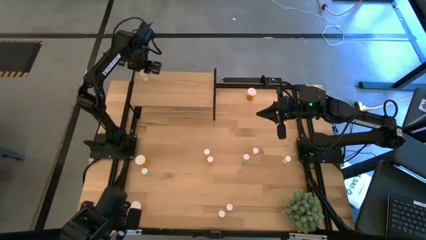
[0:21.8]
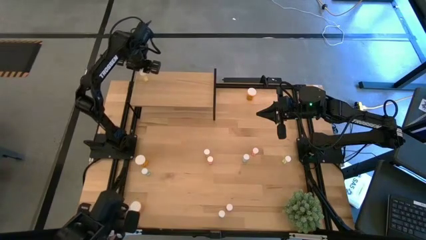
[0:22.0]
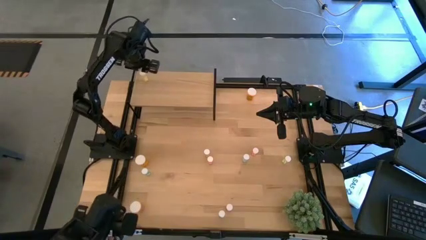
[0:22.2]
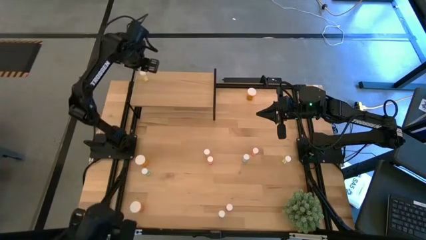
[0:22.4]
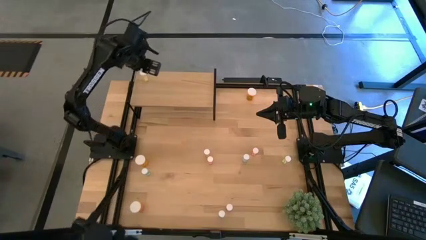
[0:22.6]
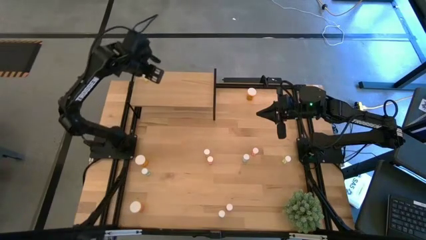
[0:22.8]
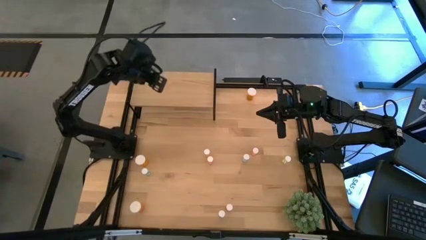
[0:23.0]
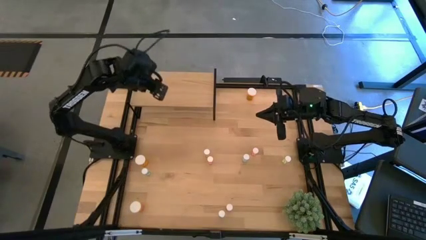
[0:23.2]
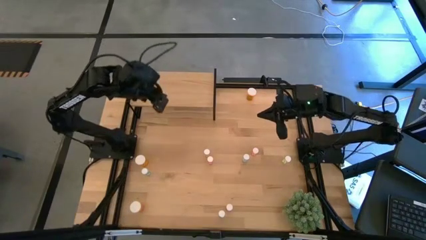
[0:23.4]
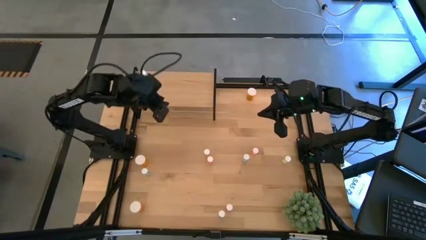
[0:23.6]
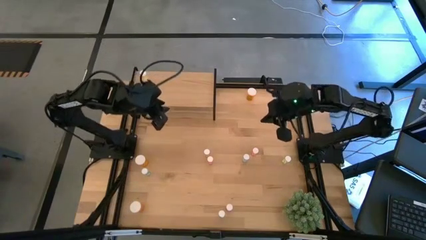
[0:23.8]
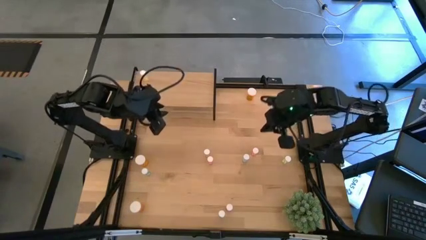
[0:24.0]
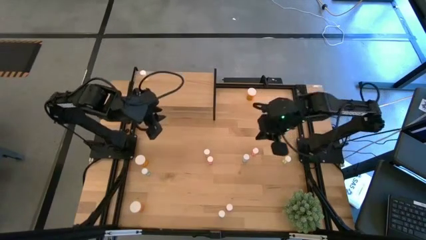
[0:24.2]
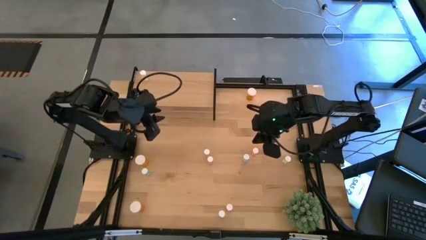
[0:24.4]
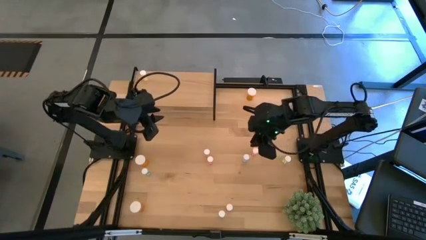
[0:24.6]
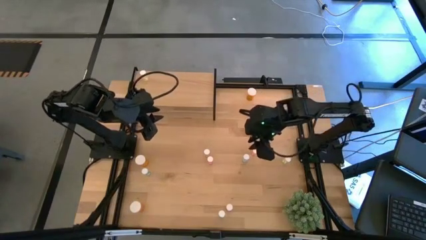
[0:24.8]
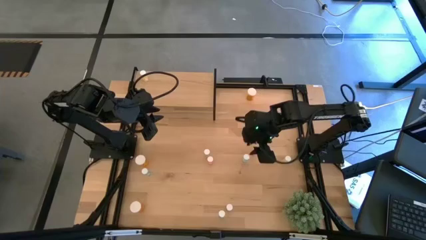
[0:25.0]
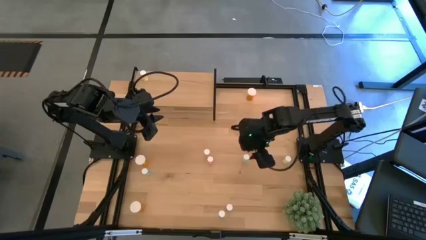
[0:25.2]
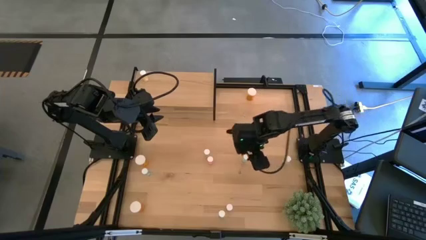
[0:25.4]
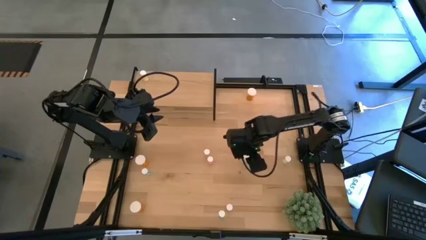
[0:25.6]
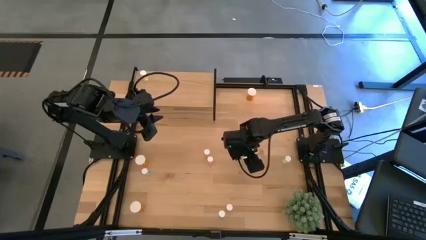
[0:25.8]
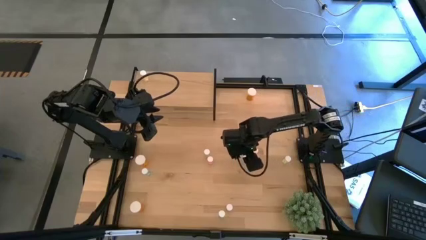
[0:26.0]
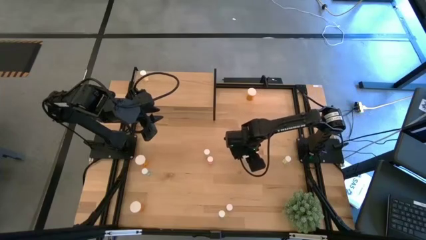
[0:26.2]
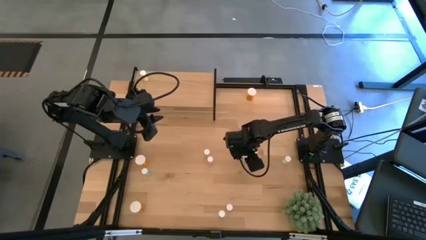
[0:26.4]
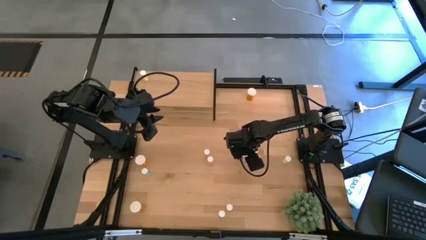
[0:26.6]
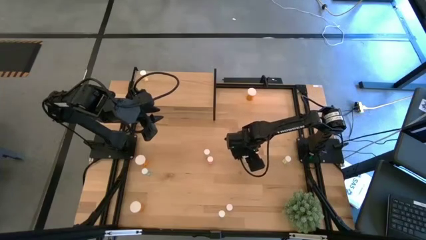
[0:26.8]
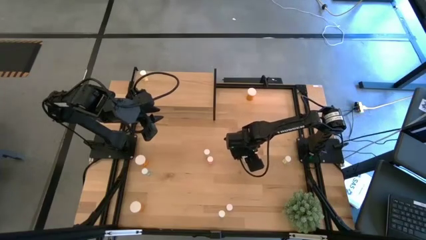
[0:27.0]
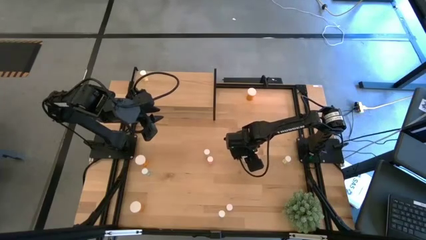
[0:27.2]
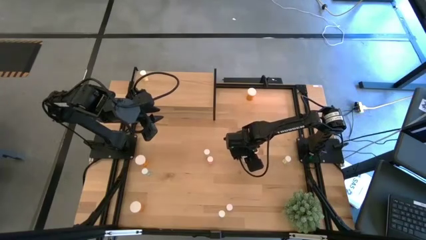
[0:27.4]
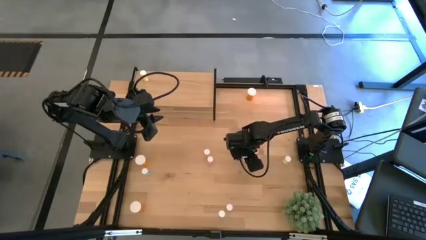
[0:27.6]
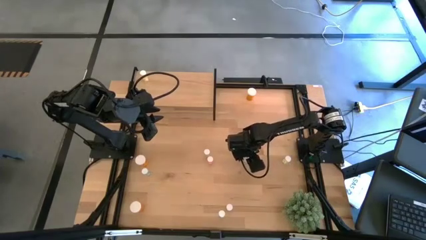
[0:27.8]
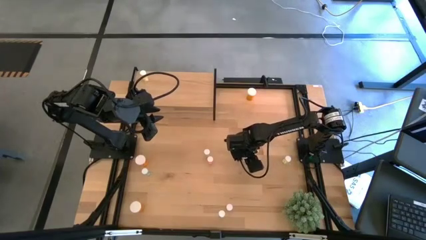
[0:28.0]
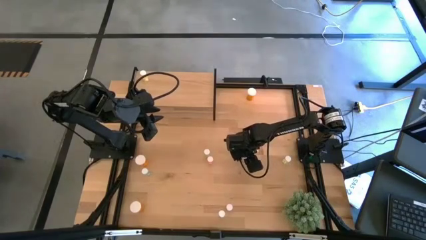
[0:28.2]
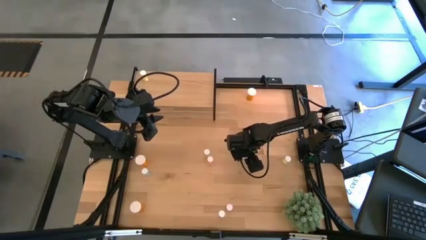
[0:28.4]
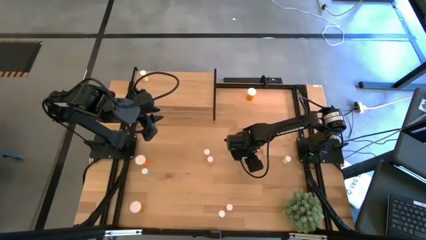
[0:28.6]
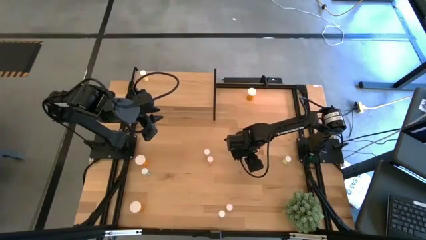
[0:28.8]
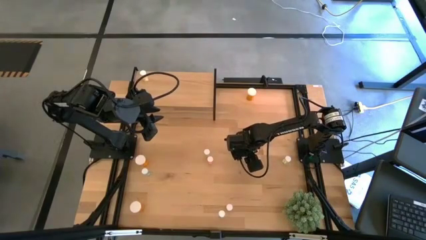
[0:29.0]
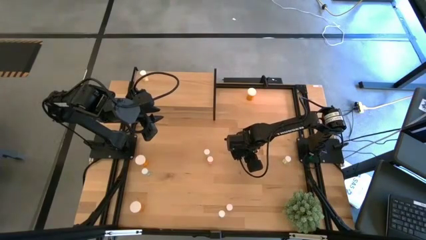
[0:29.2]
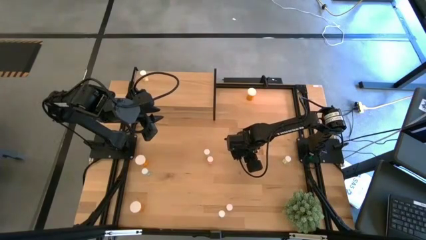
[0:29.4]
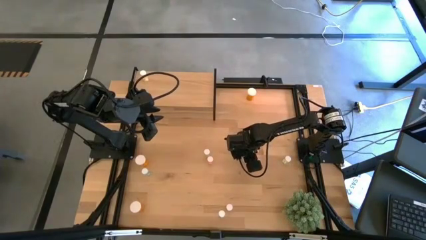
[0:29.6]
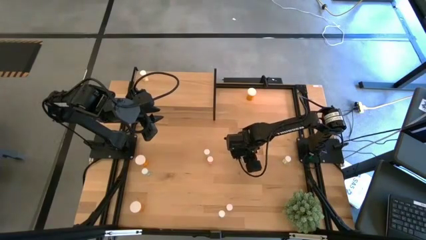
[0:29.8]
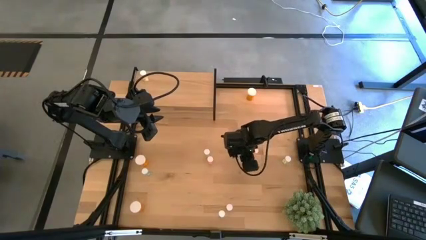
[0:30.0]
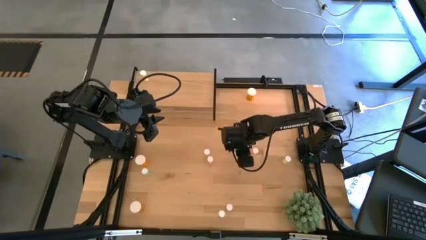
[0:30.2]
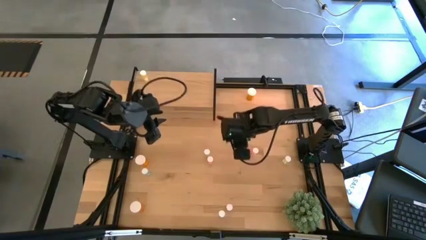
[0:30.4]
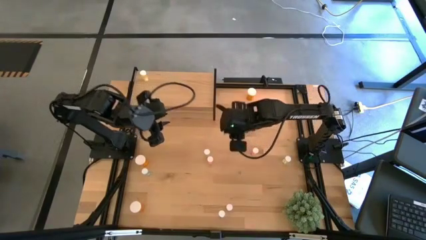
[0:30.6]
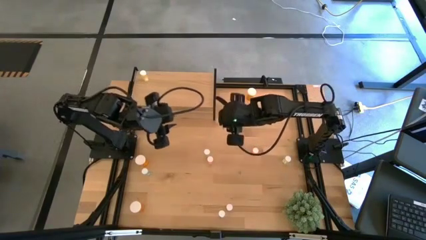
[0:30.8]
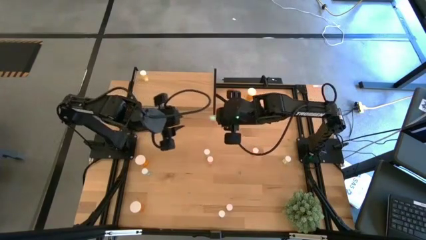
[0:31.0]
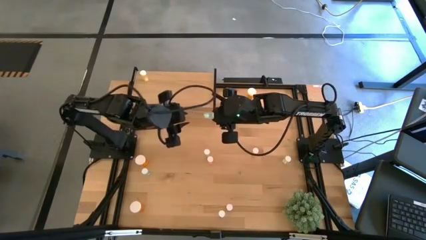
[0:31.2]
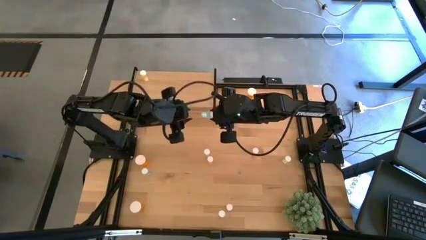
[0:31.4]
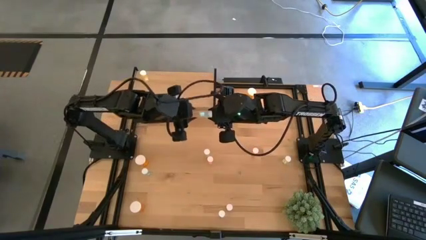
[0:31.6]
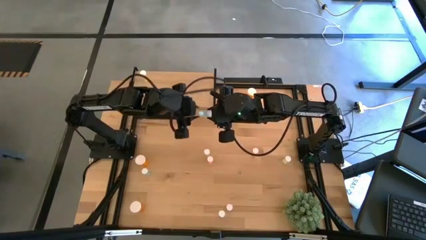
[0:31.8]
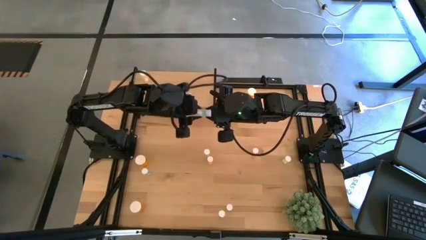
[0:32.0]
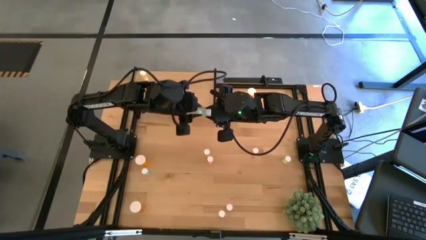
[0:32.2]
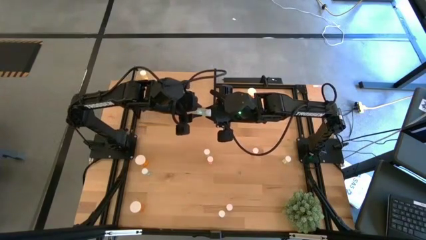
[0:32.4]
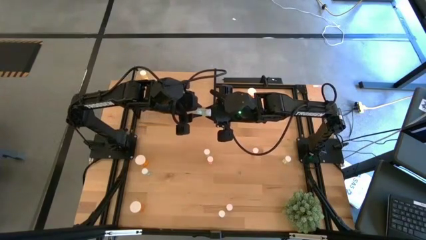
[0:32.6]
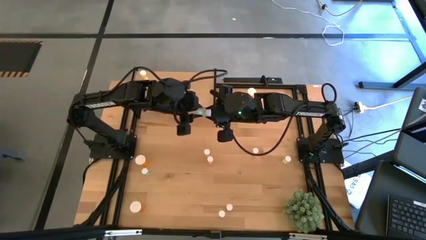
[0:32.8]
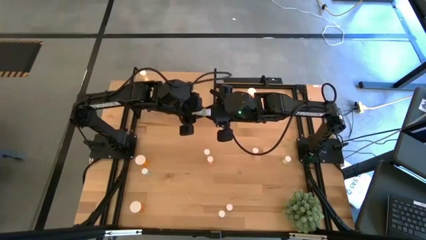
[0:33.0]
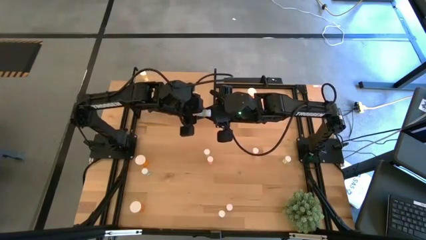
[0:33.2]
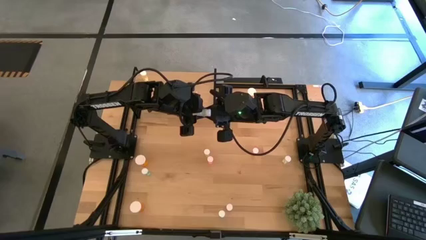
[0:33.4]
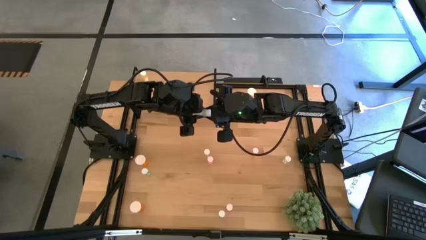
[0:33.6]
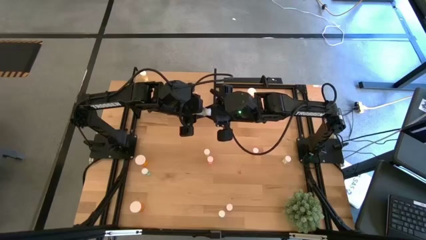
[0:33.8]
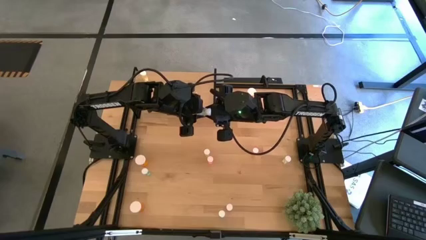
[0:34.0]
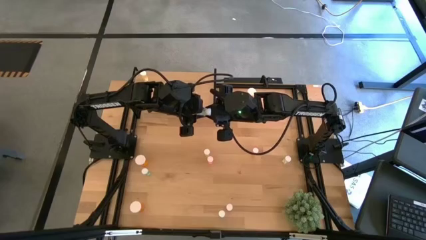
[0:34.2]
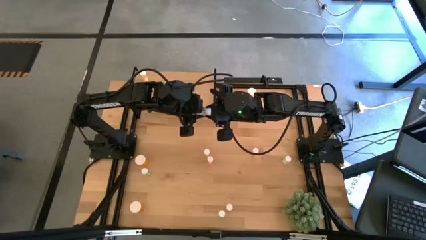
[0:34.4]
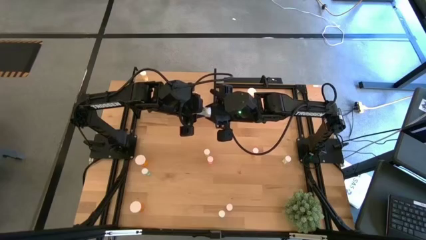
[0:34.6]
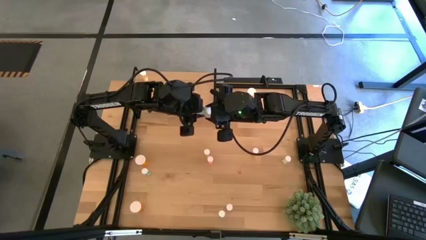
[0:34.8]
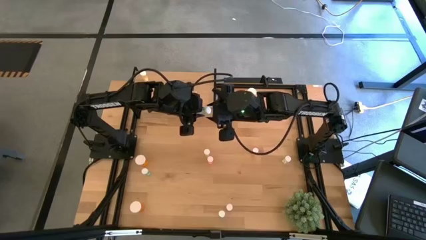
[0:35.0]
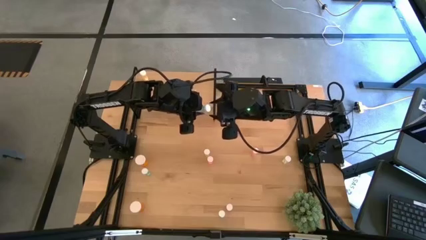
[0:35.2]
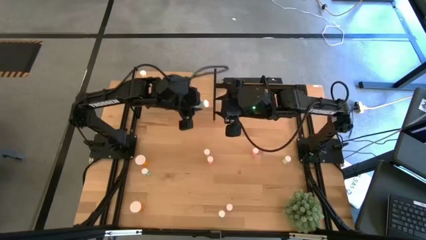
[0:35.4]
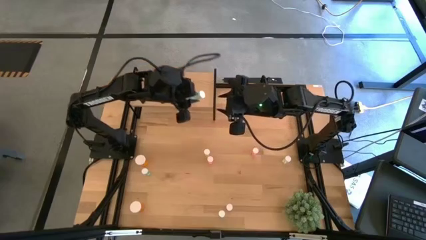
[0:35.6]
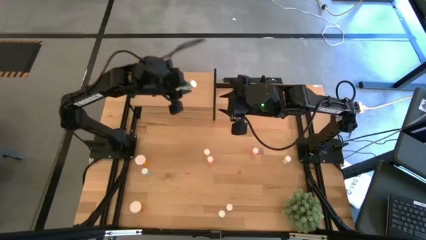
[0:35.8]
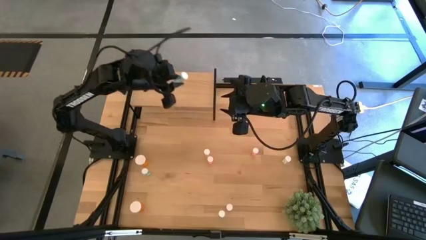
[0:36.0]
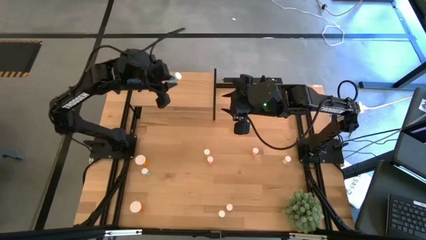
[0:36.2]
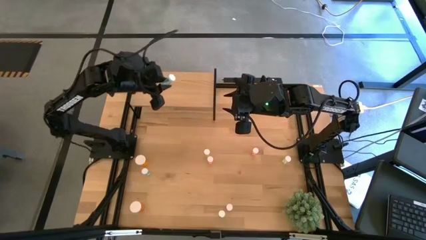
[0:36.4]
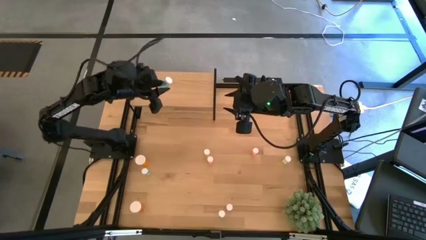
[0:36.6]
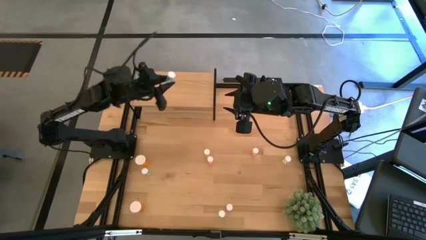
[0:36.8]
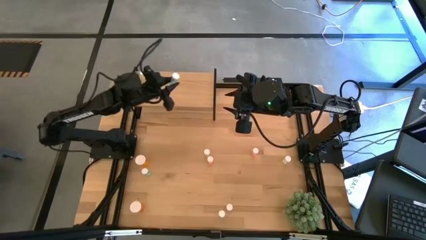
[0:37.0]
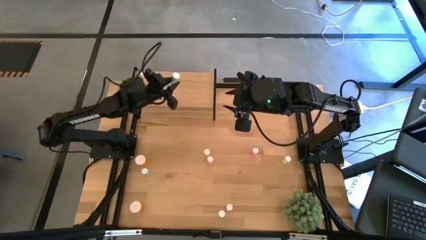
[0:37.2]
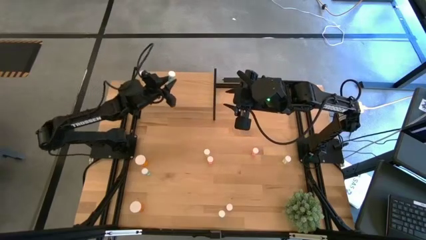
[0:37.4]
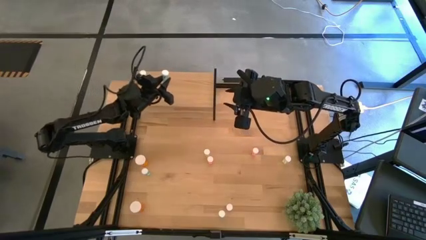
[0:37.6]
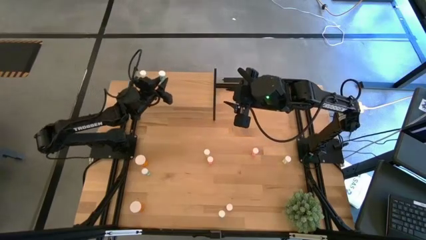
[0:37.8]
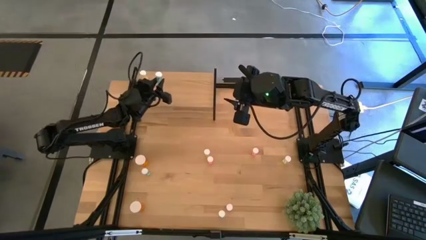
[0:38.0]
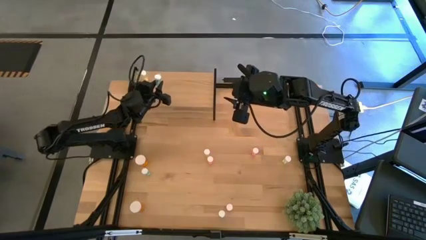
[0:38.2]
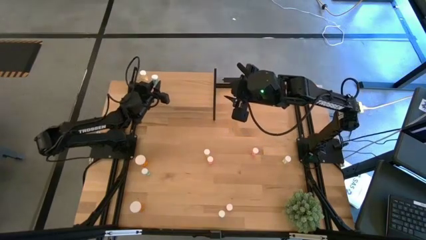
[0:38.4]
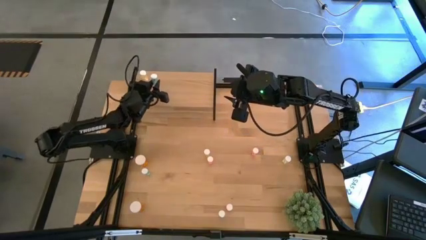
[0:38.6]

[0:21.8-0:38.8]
Task: Pick and place medicine bottles onto shelf by color
Put the top right small blue pill on the shelf
